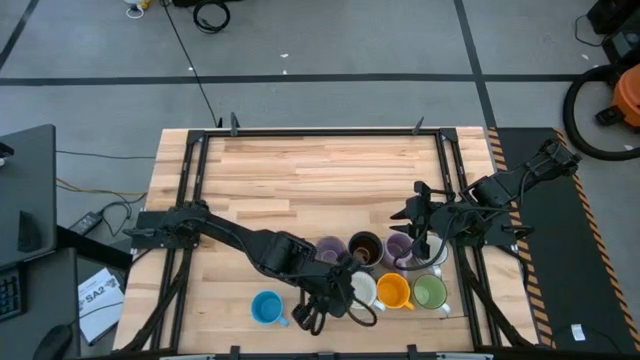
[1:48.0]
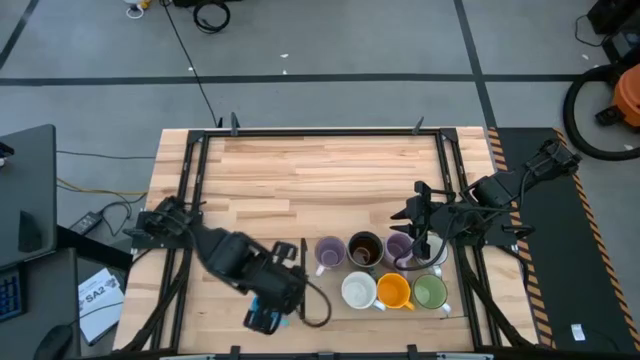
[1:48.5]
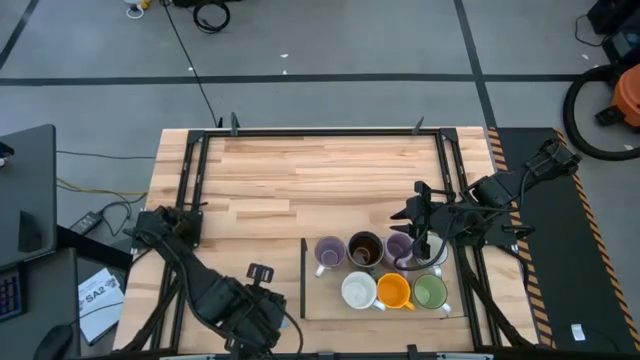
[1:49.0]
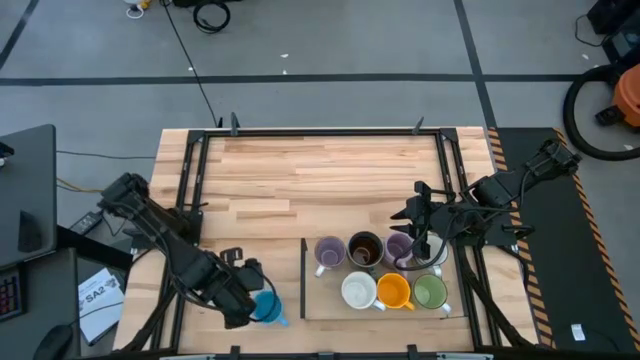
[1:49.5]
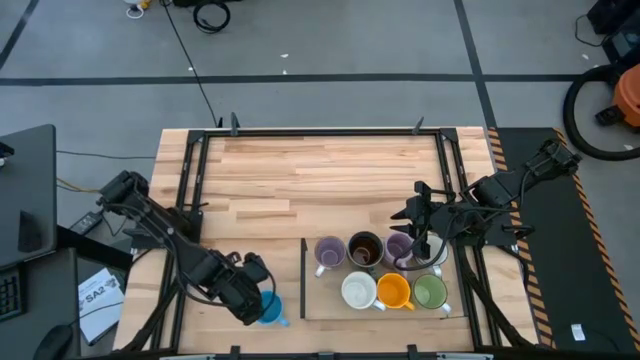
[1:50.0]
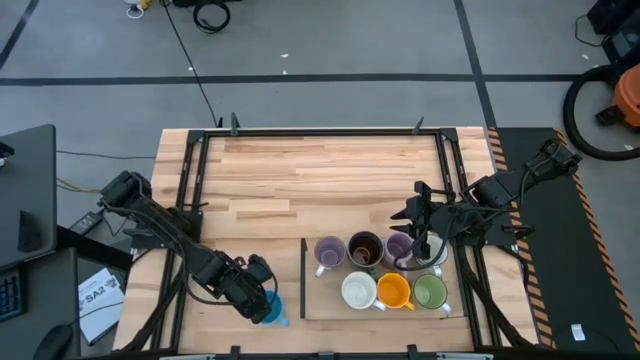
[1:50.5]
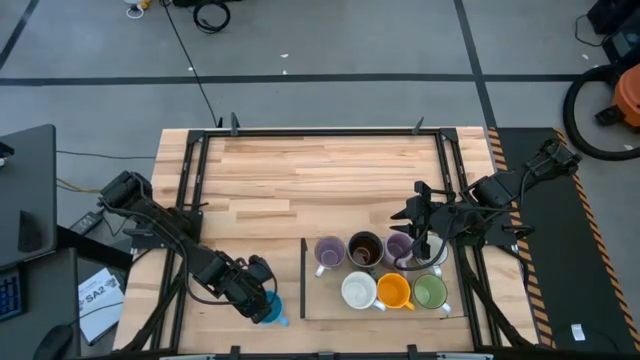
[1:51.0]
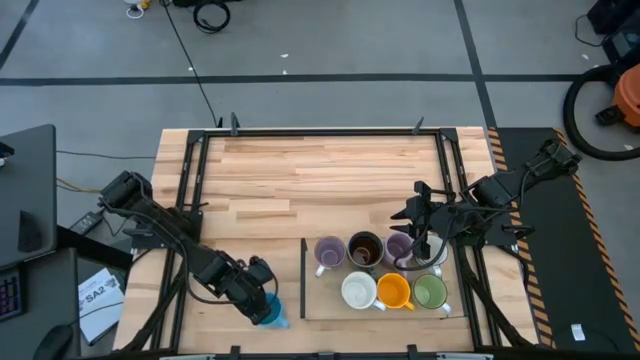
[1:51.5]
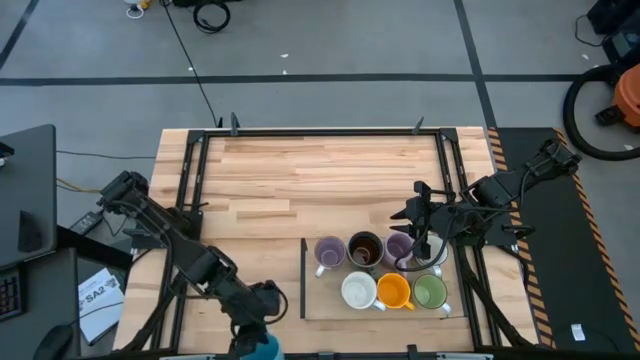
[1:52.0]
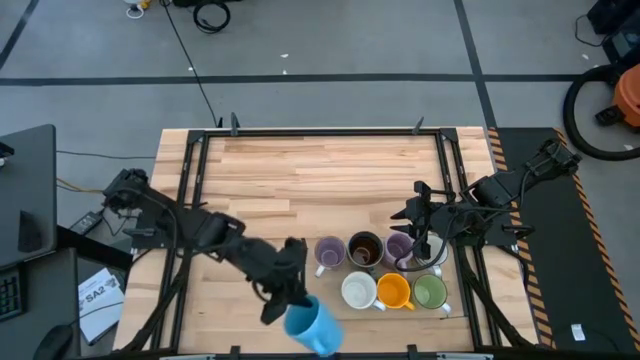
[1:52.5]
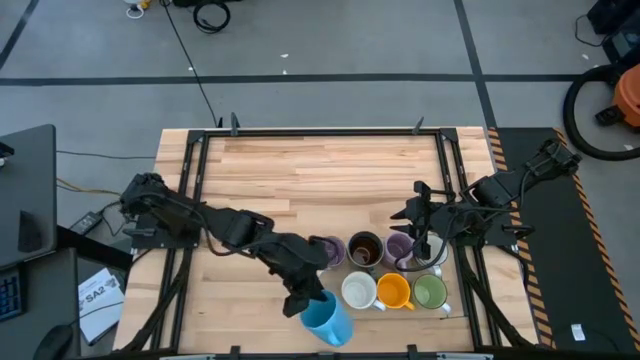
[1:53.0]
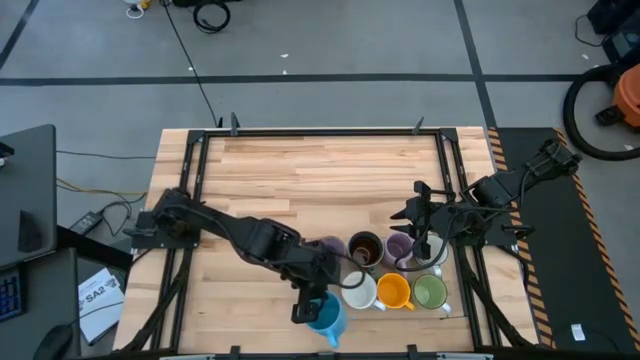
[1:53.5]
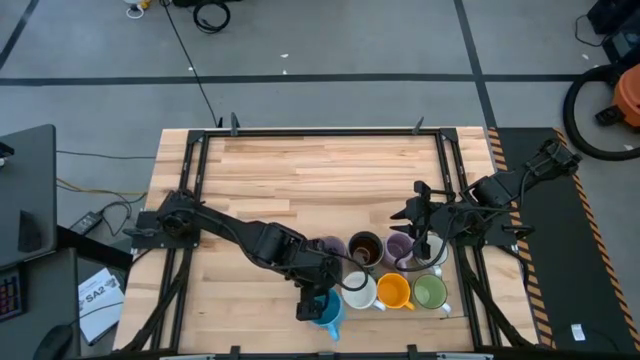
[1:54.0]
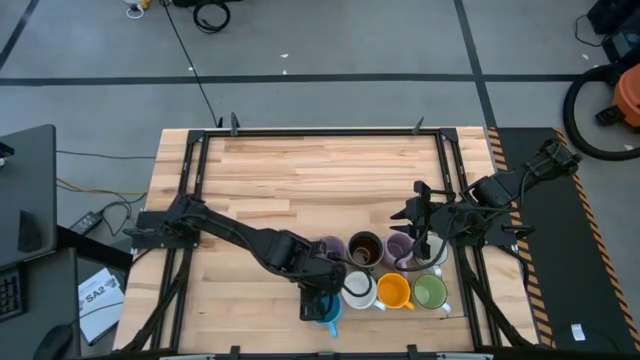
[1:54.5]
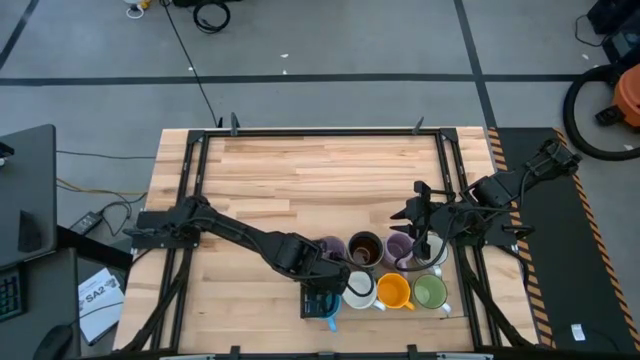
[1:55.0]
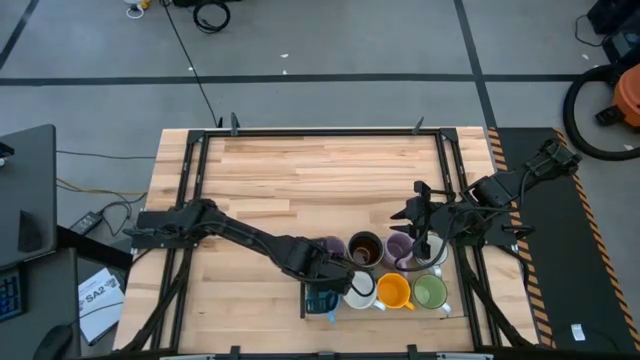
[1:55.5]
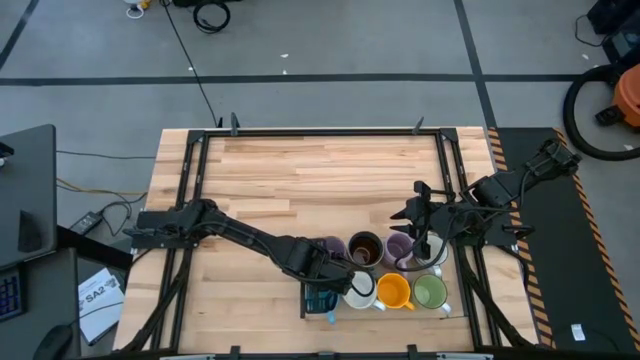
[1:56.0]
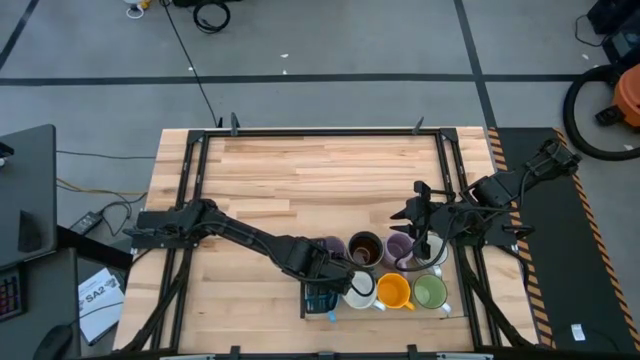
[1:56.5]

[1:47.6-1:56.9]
Task: Place coffee mugs
Put the light blue mug on the shelf aligned with the purple mug

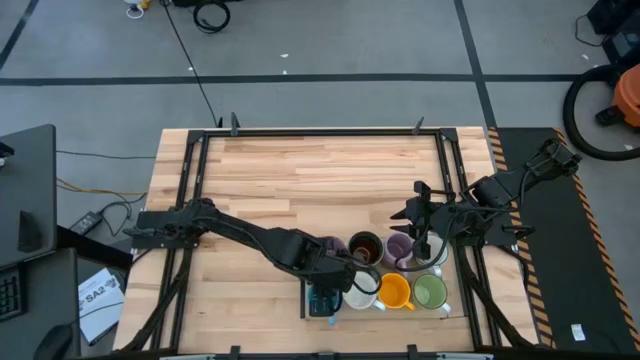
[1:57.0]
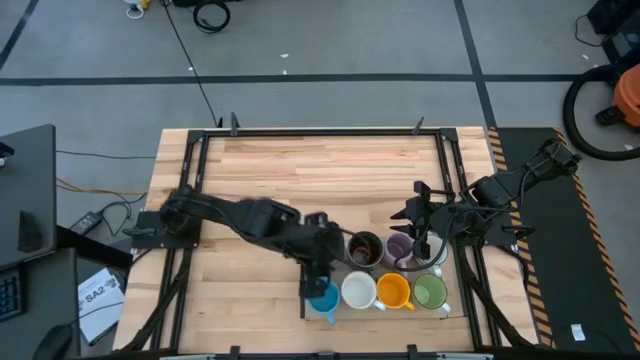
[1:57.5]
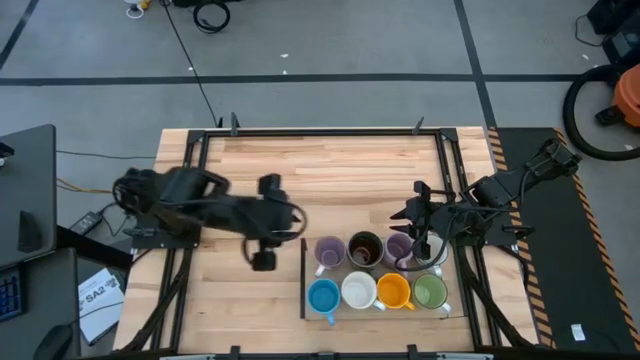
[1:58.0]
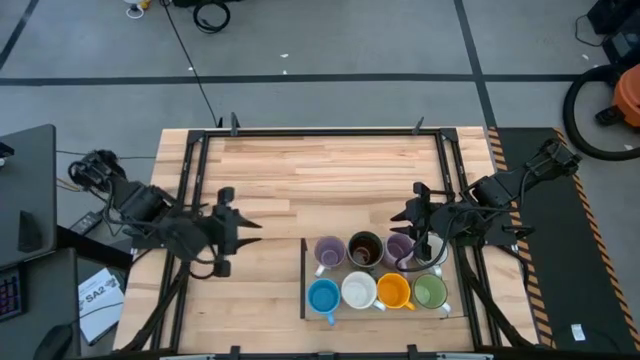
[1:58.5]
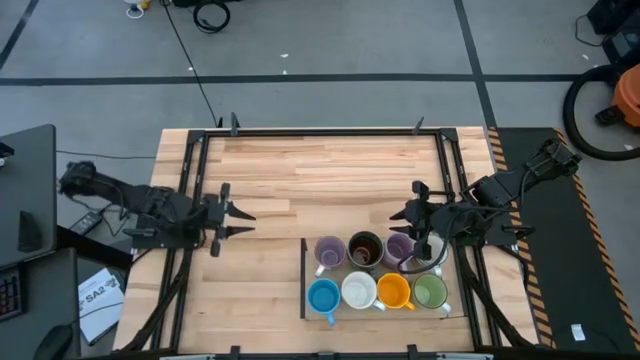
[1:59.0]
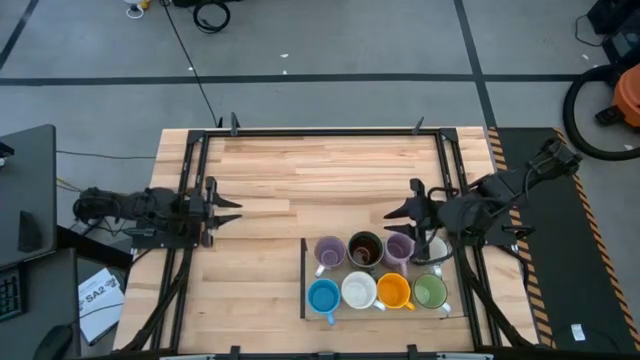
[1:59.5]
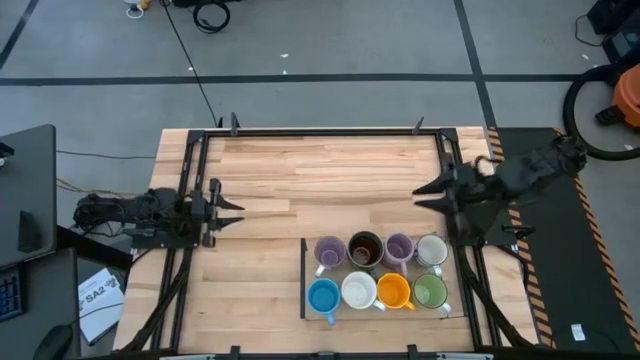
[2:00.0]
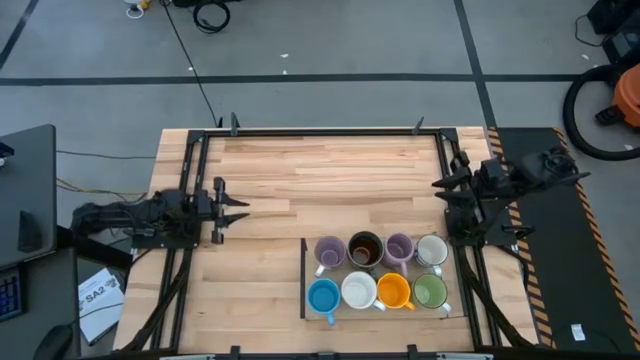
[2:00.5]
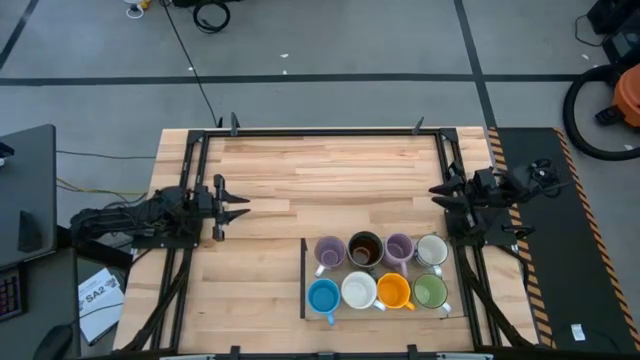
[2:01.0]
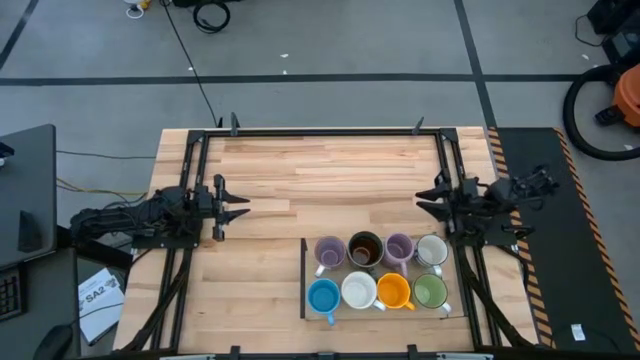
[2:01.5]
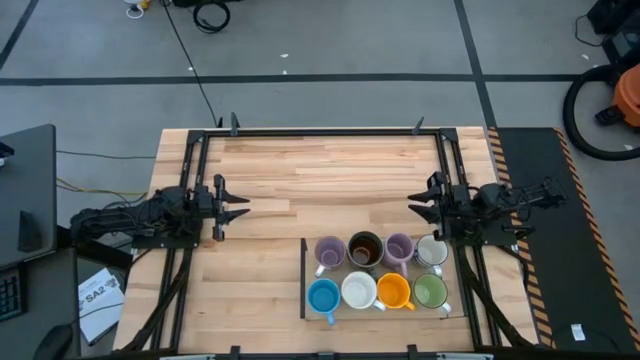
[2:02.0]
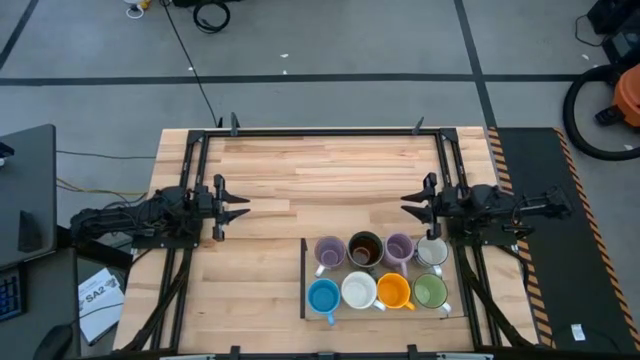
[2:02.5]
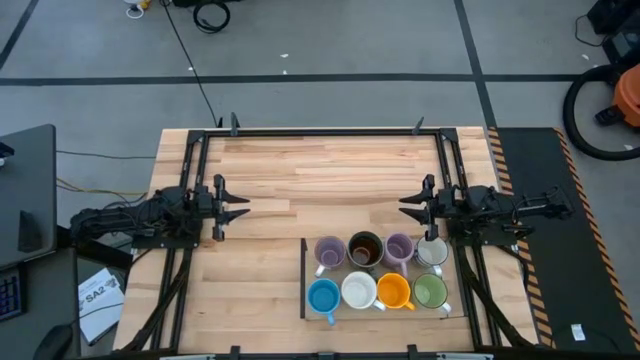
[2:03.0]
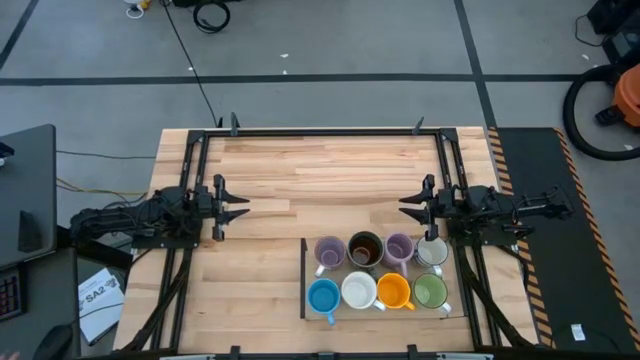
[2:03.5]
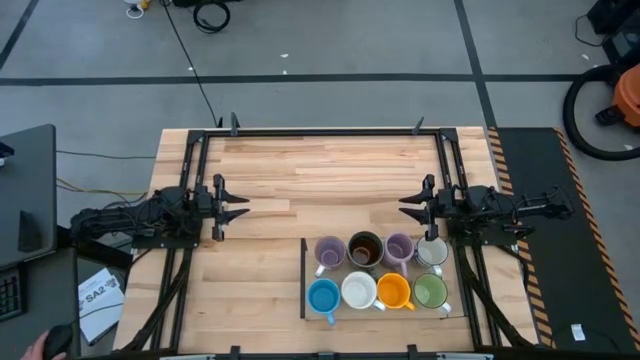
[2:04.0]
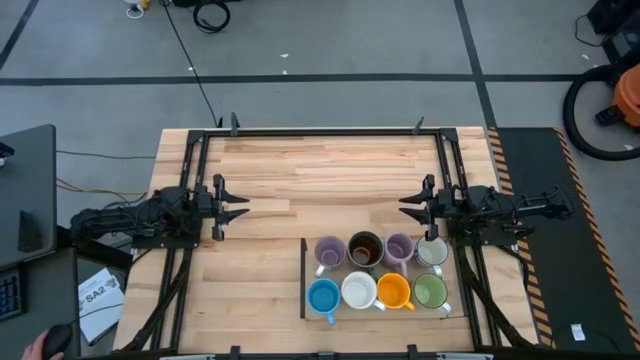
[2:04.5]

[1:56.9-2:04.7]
Return to Home Position
